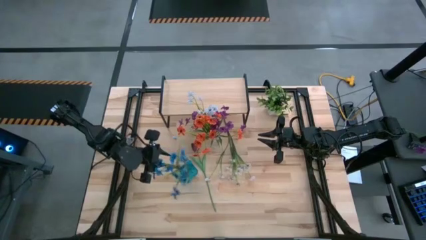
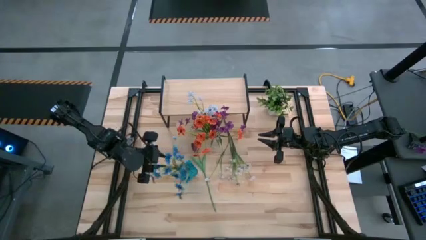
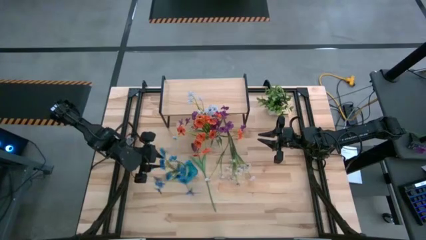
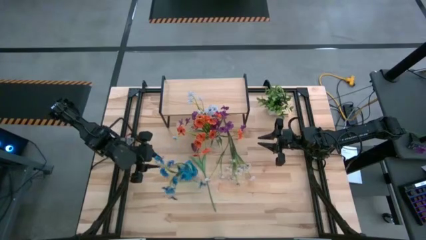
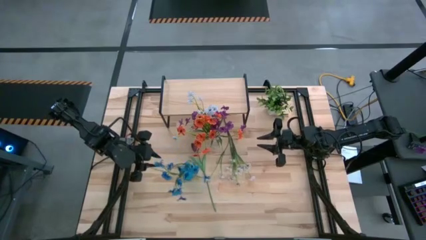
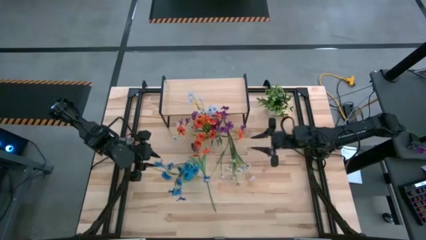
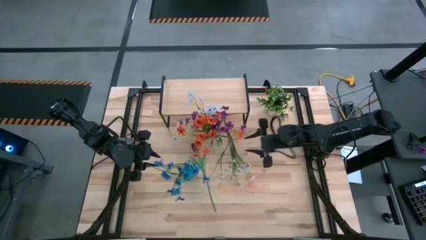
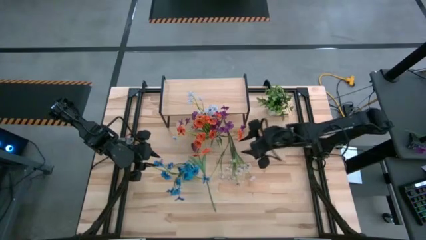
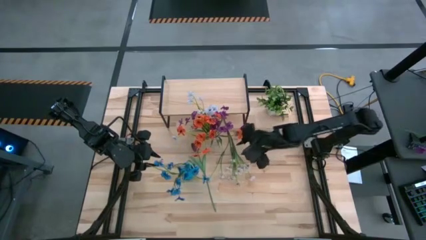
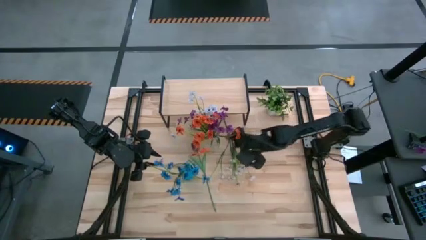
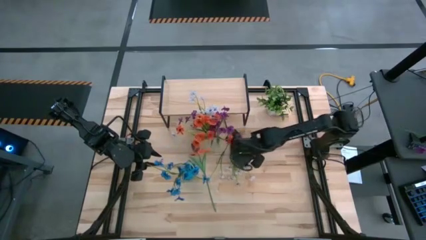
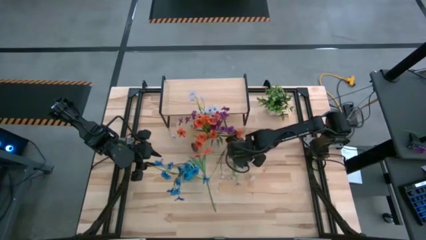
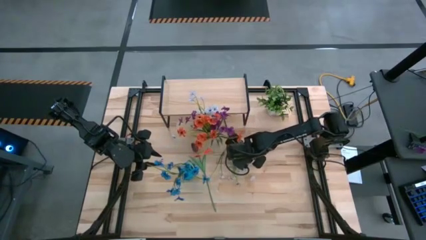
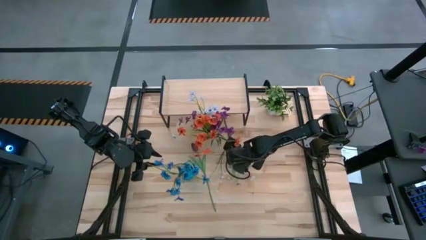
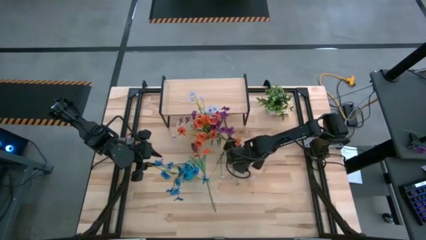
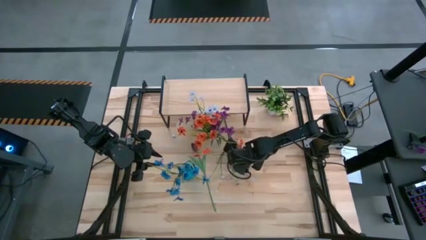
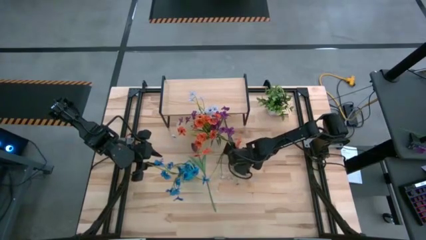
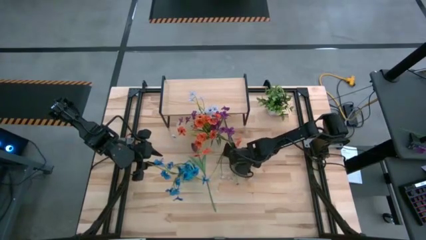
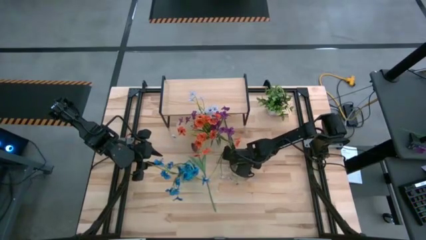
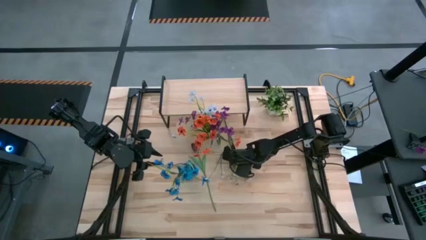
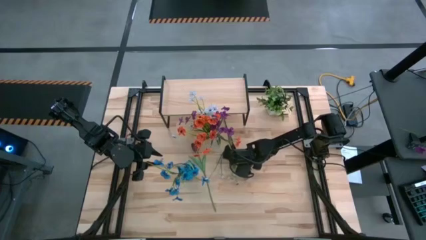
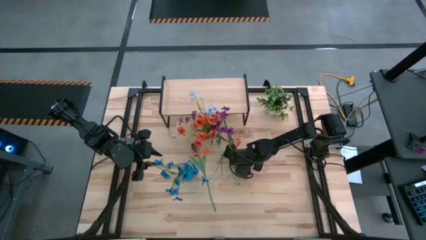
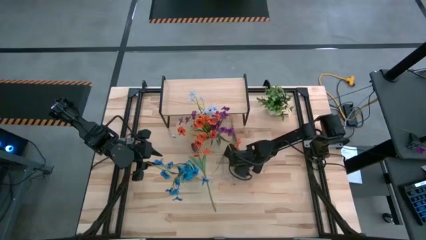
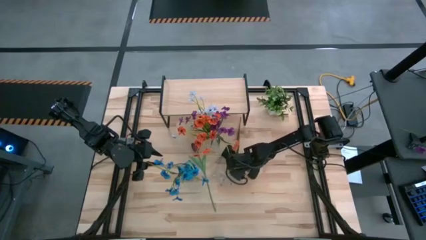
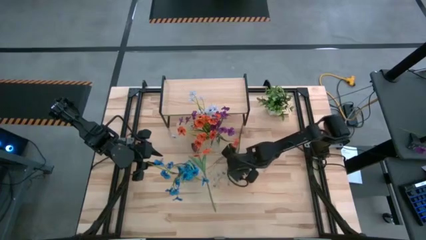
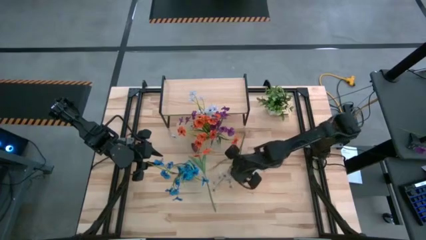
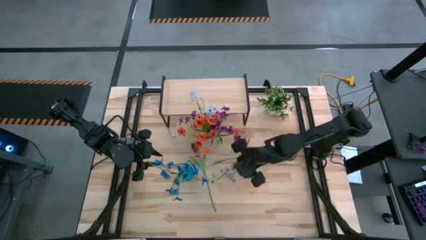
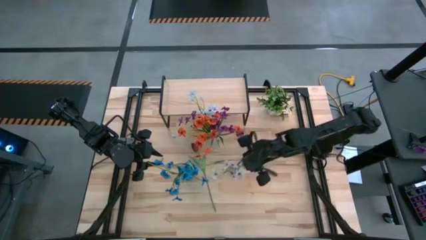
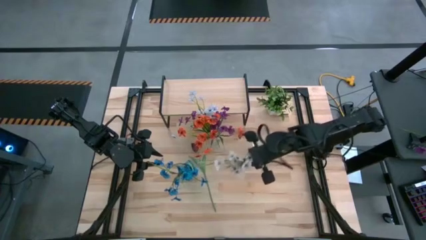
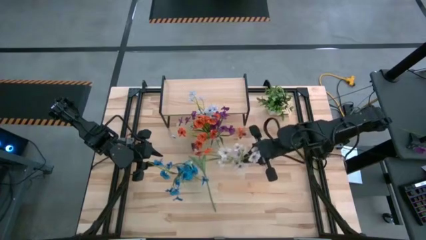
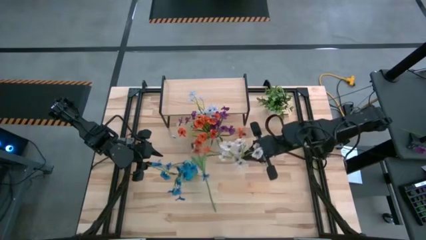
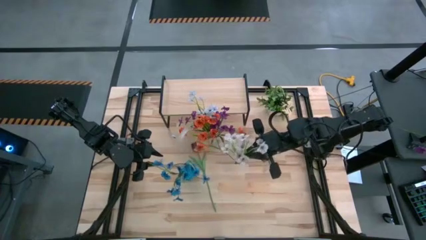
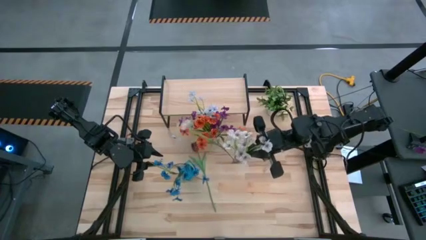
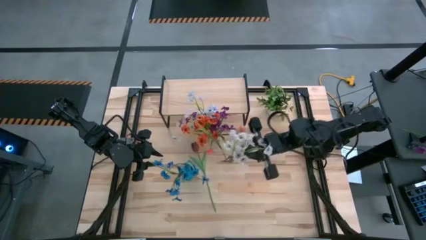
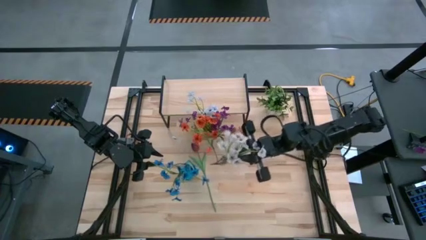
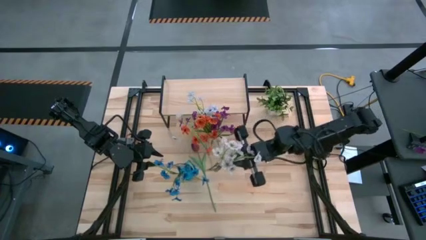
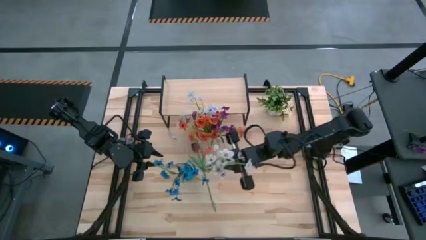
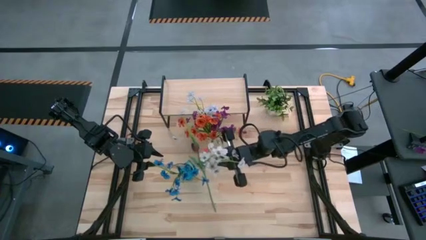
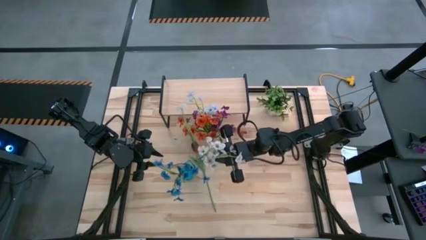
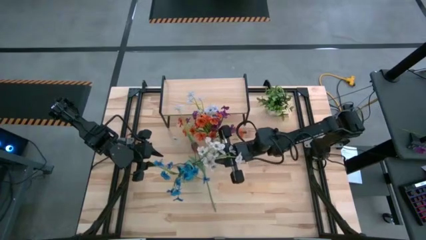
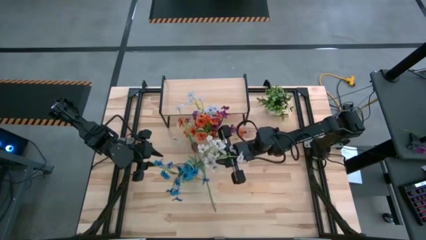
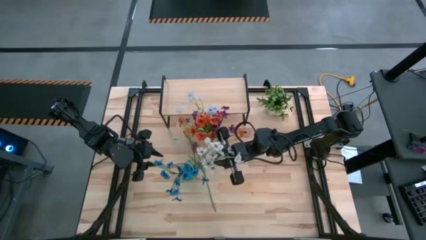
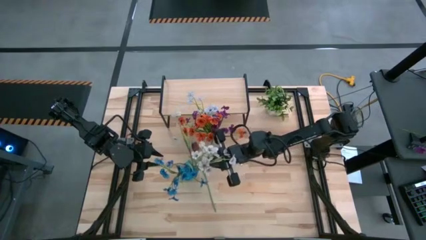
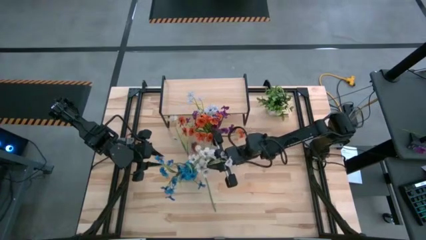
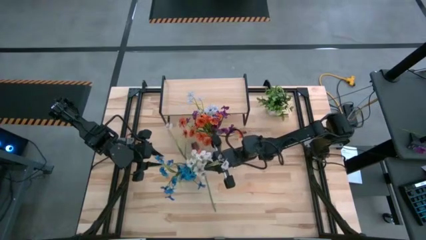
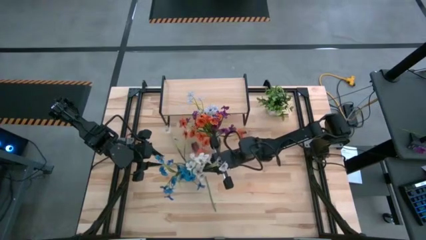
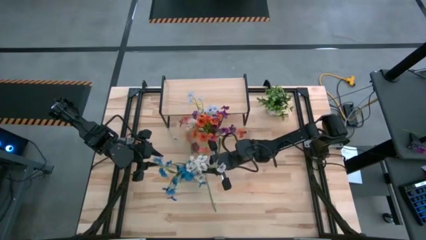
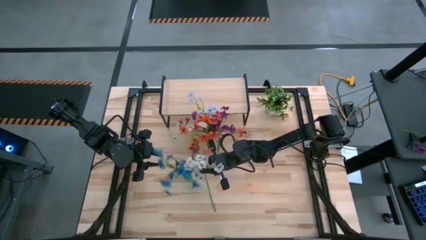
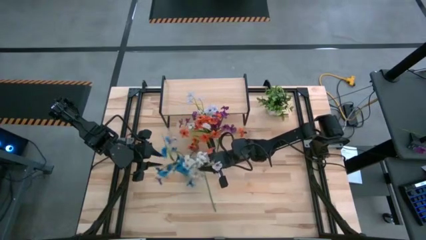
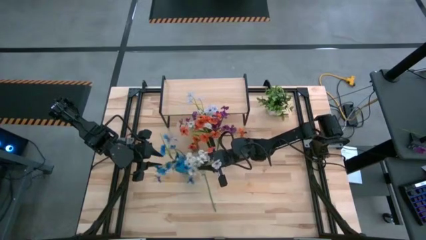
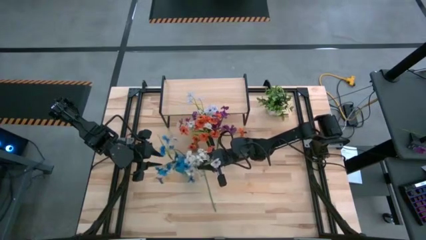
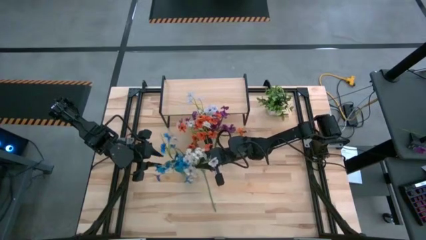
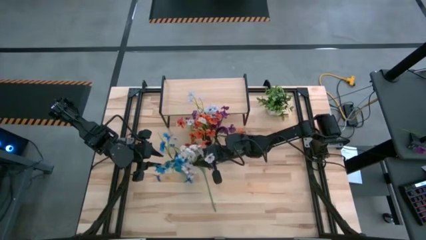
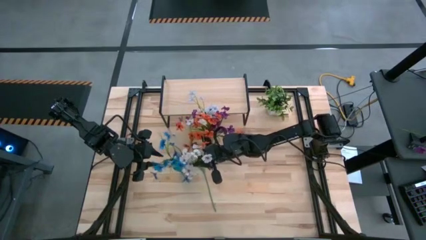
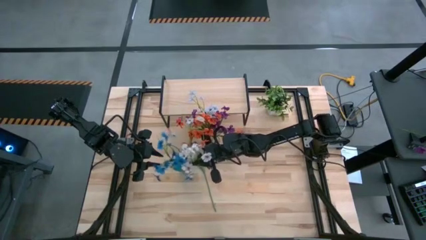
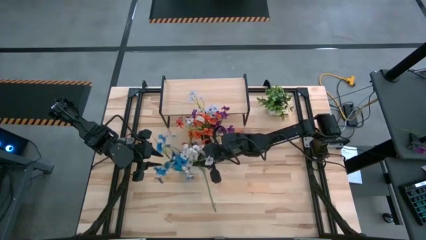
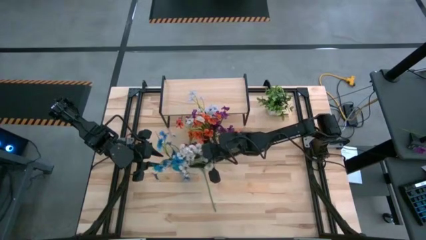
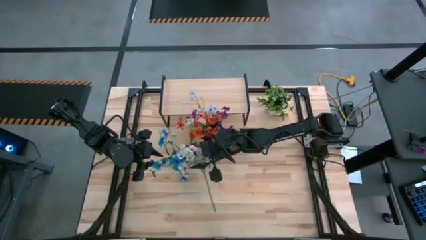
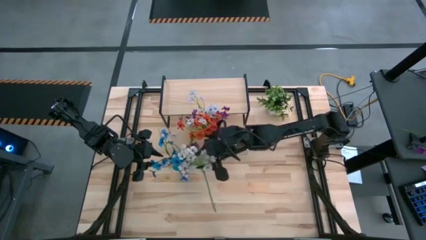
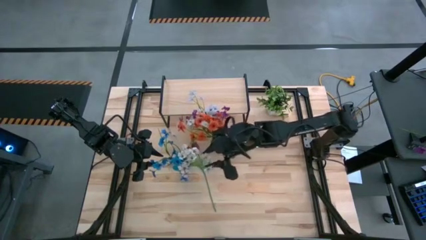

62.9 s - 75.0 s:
Task: Pick and place flowers into a vace then onto a shelf
Put the white flowers into the blue vase
